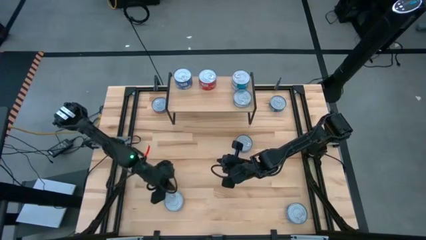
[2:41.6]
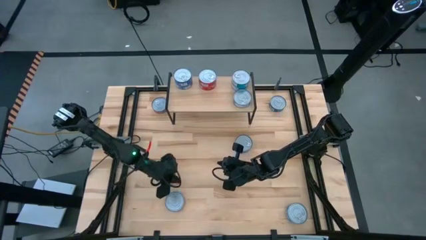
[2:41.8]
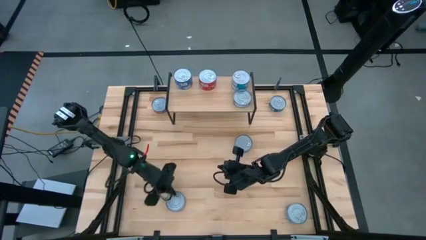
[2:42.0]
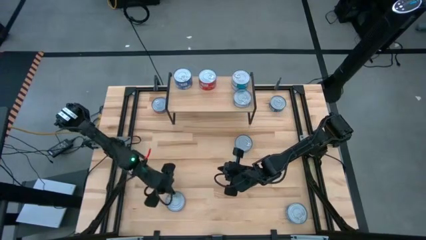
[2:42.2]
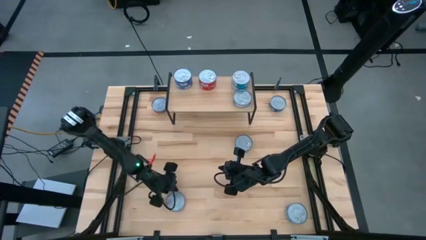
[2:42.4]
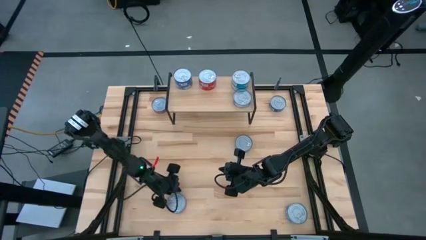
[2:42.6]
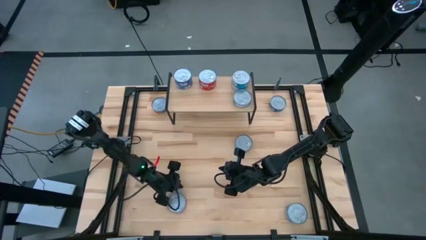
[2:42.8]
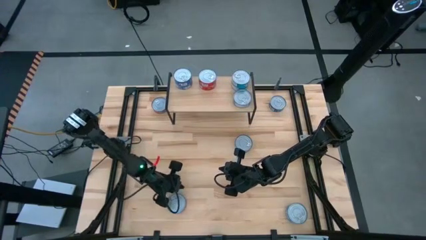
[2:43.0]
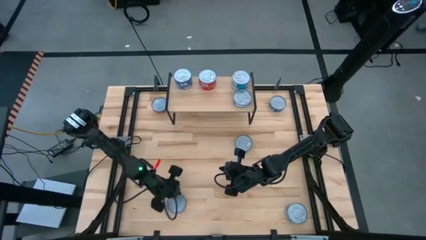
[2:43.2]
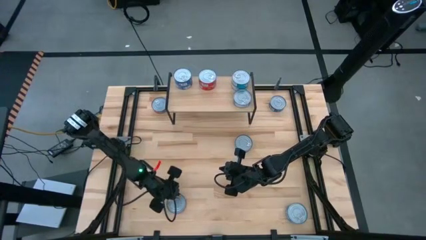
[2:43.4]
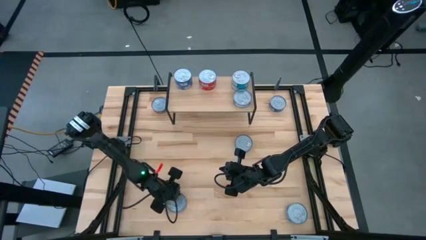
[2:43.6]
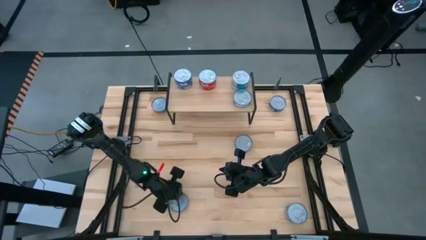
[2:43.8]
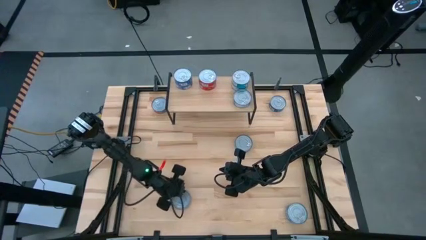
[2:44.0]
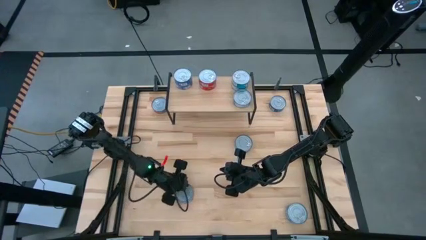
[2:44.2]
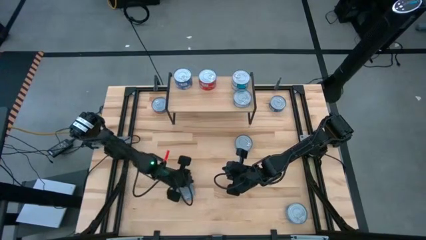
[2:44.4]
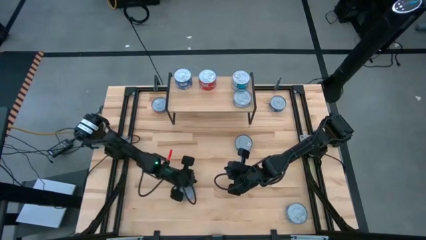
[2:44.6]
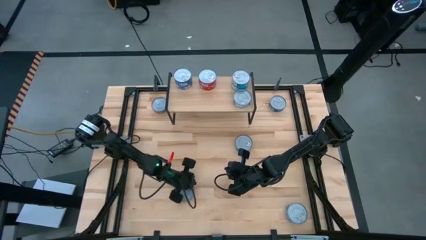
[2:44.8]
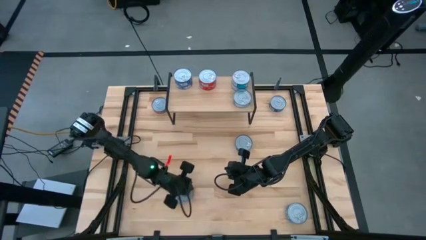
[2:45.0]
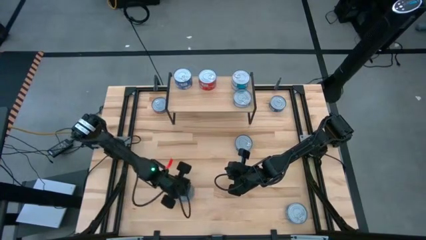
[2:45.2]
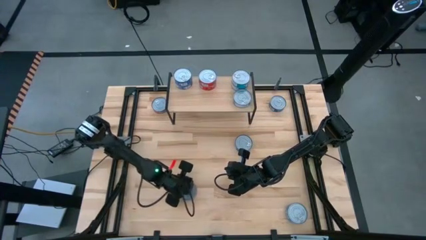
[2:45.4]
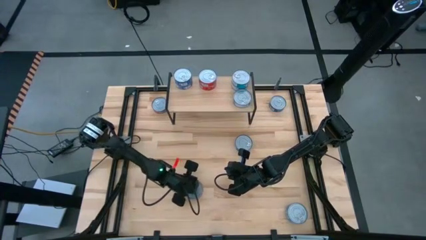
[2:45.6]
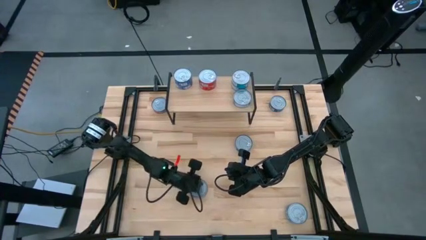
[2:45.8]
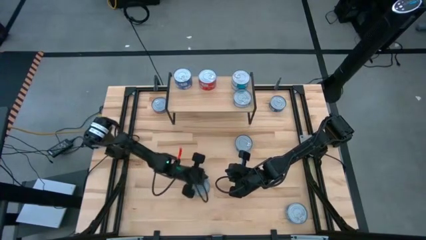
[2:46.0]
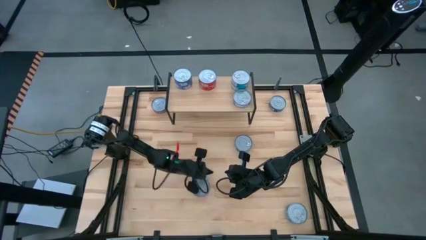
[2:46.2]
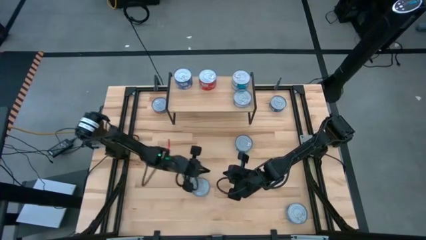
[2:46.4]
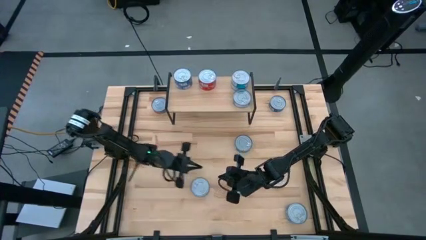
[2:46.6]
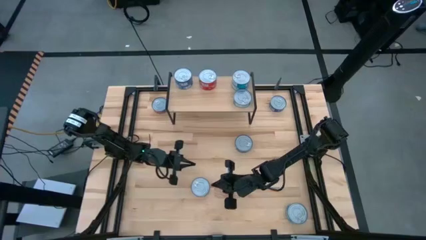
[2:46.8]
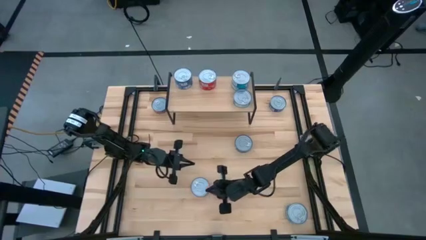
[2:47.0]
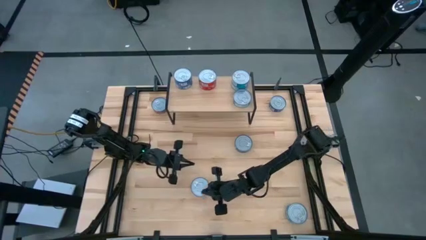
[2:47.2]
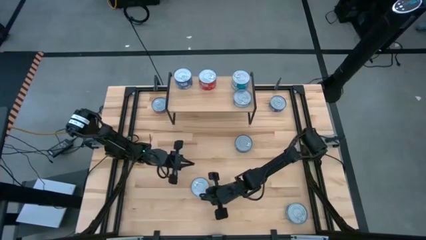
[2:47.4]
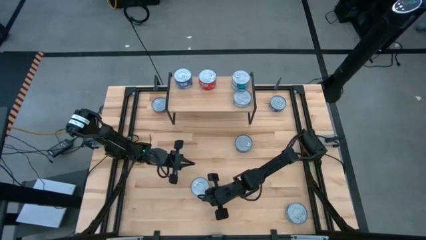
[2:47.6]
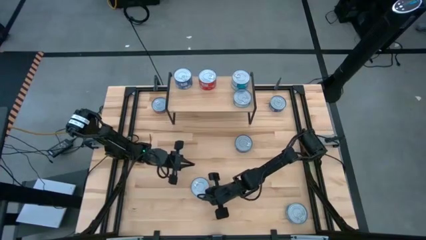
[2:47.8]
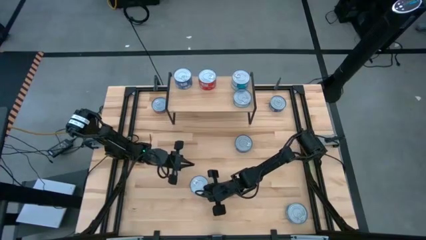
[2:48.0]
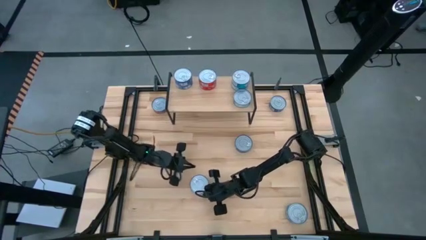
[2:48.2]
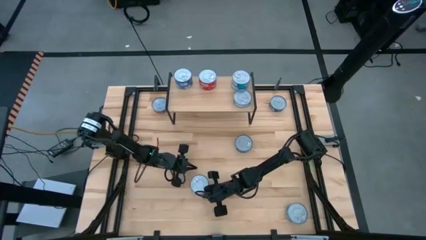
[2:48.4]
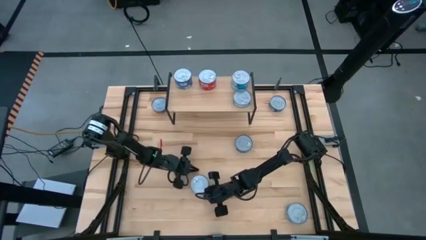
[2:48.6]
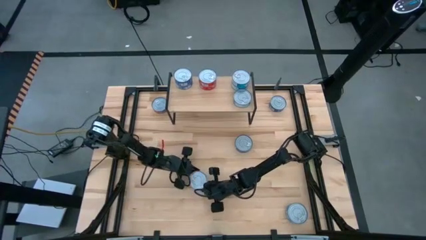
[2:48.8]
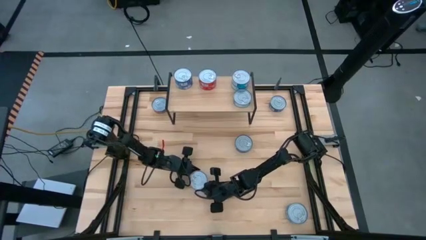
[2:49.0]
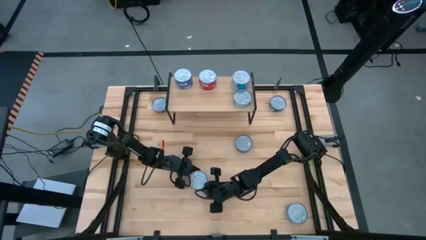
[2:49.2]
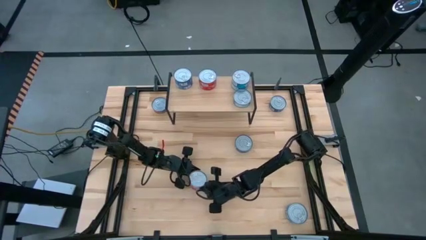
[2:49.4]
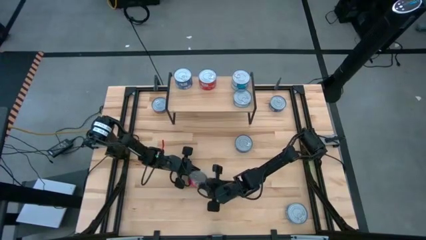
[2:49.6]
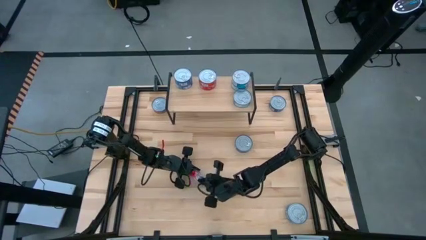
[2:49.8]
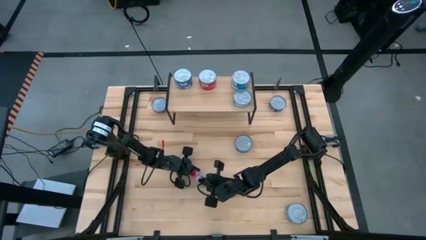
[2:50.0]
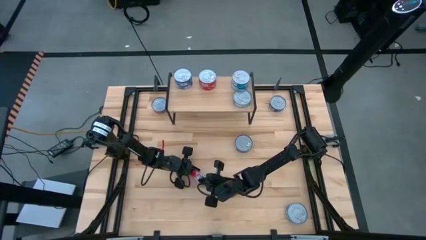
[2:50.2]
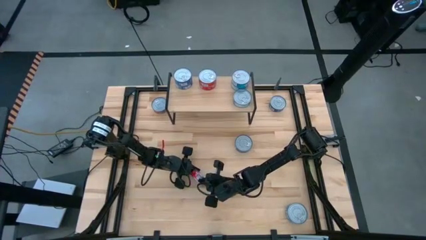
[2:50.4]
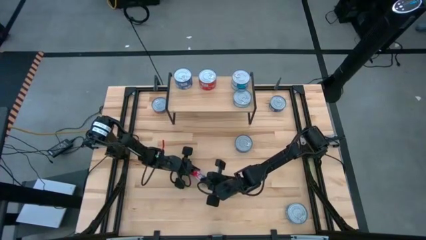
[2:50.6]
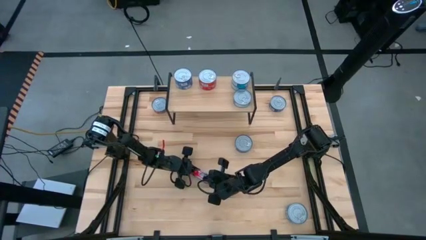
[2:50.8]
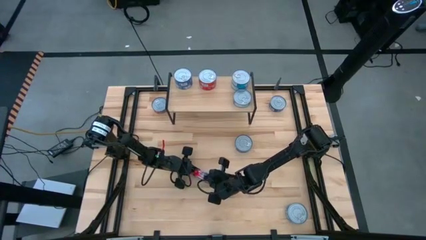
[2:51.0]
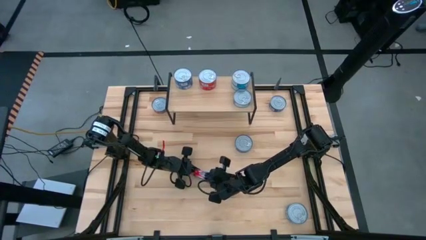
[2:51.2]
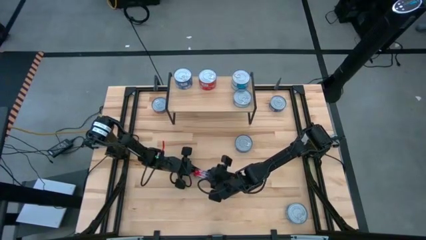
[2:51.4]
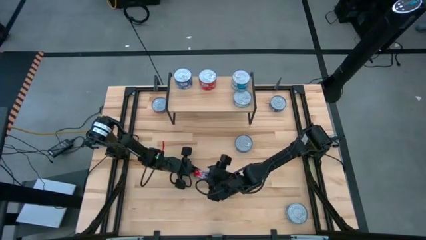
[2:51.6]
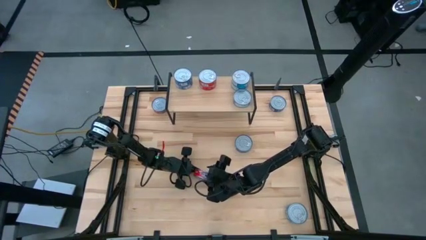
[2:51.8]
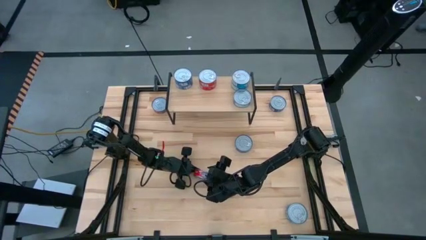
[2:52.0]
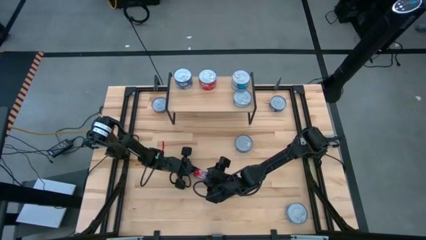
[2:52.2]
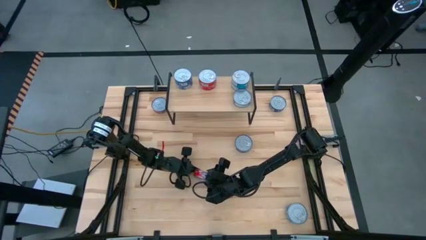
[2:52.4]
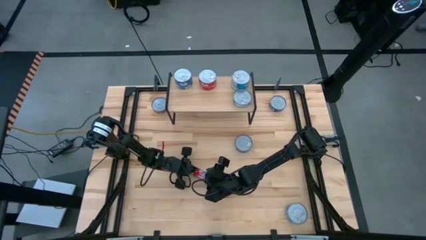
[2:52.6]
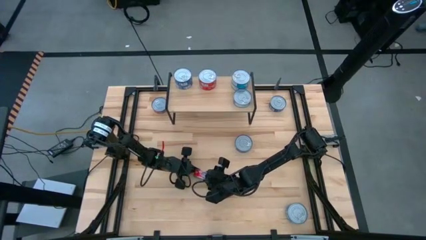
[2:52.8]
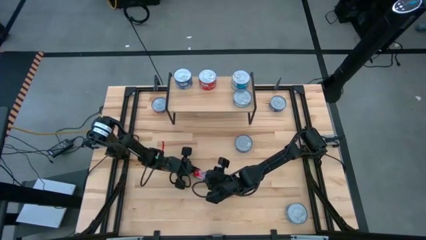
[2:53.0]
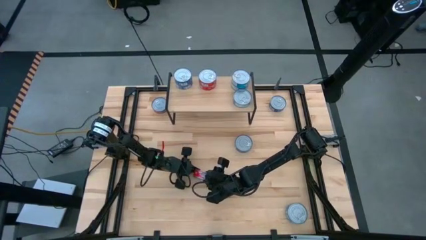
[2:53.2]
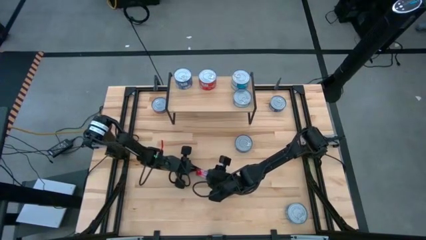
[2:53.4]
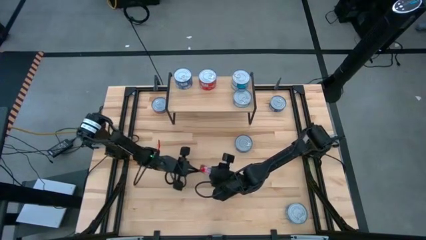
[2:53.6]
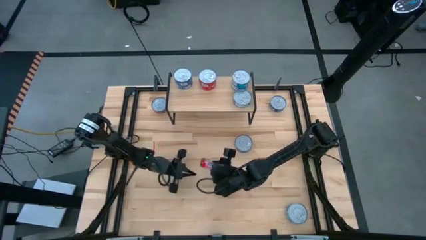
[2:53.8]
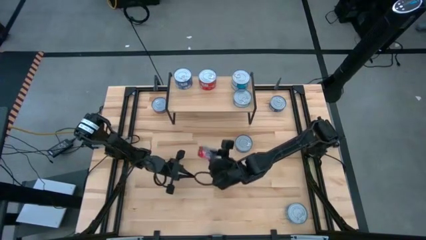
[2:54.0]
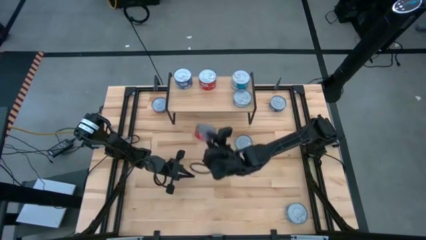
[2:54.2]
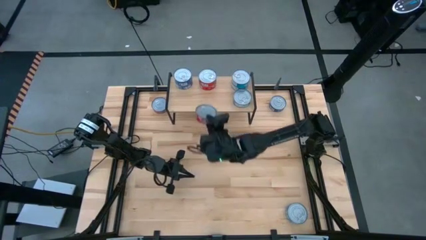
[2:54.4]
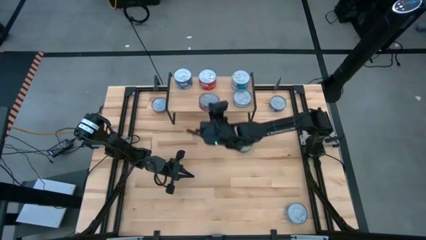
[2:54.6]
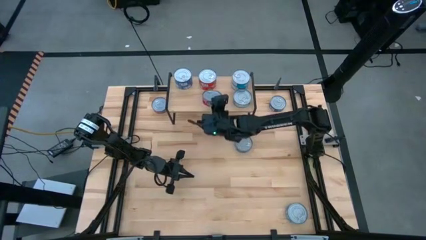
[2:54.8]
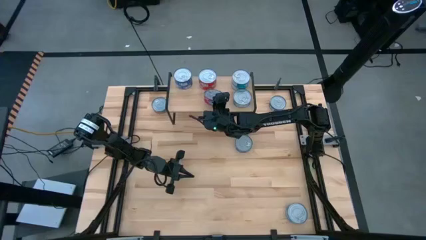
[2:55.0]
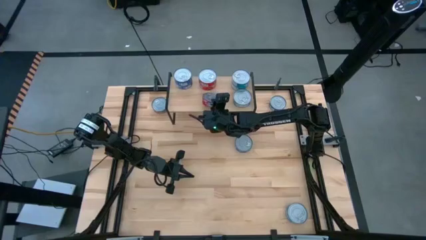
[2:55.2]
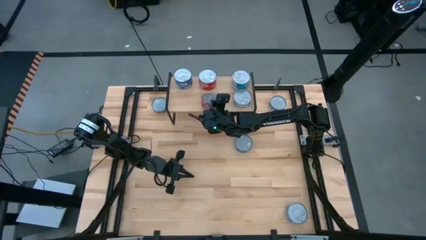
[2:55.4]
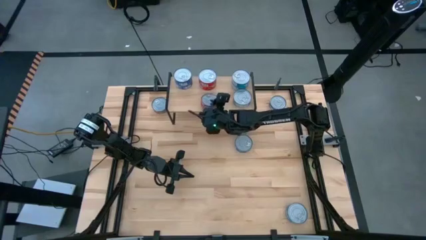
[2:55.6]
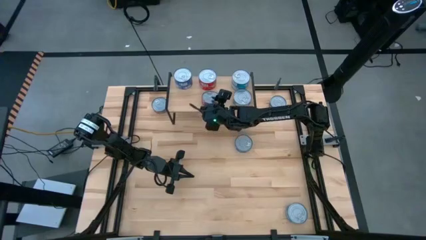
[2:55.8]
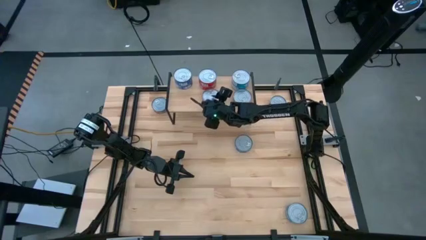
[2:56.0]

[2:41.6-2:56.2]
Task: Stack canned seafood by type on shelf
Put the red tuna can on the shelf aligned with the other red tuna cans
